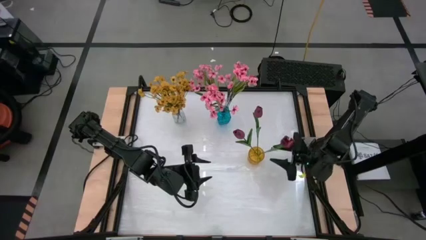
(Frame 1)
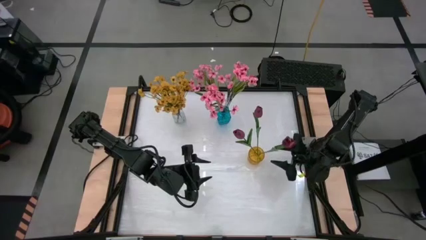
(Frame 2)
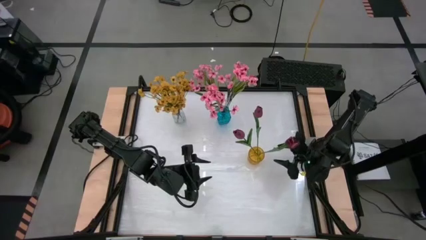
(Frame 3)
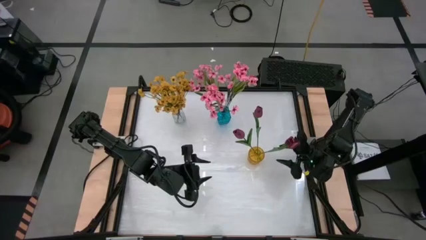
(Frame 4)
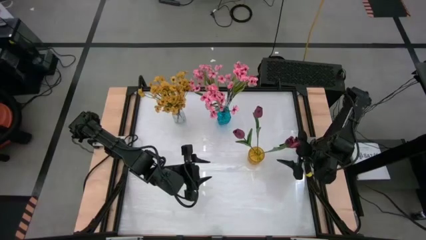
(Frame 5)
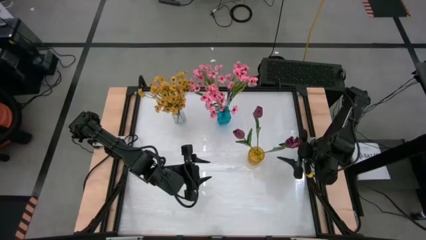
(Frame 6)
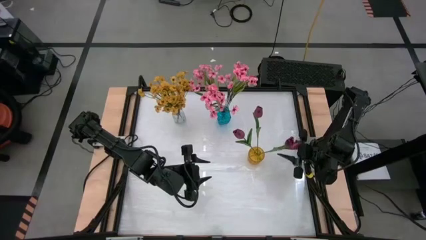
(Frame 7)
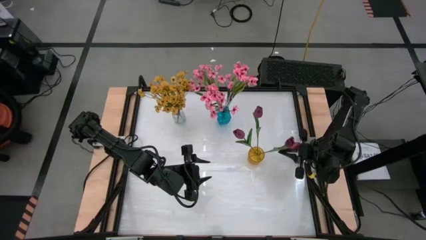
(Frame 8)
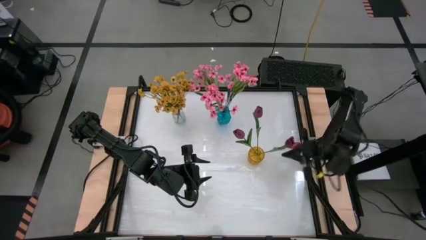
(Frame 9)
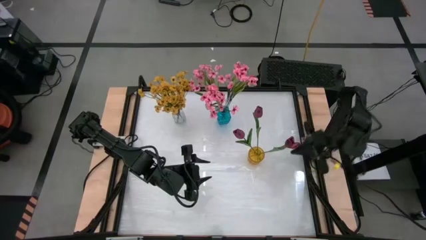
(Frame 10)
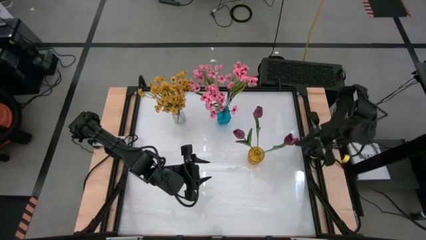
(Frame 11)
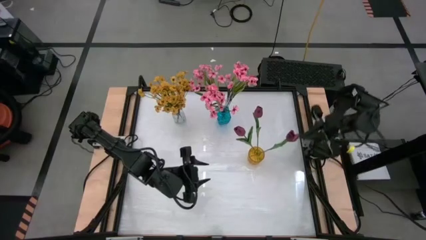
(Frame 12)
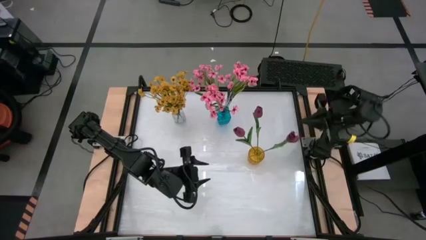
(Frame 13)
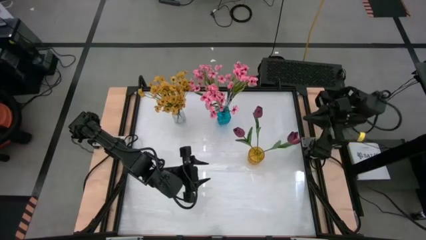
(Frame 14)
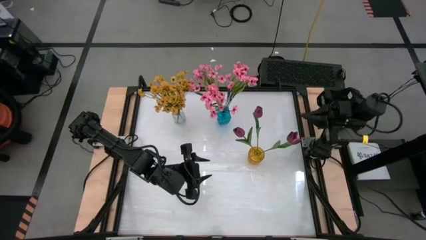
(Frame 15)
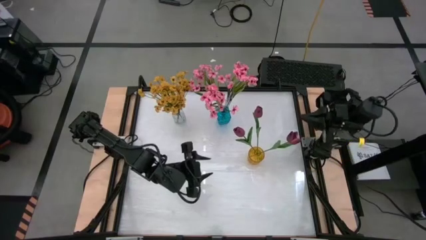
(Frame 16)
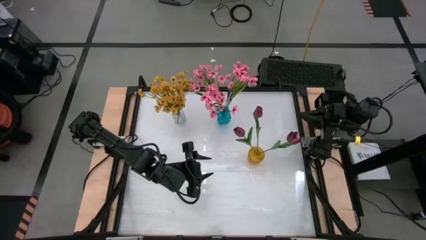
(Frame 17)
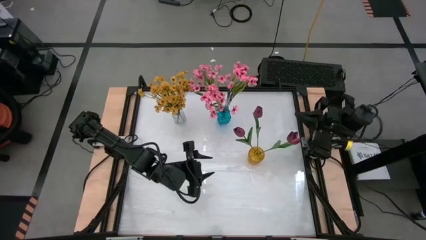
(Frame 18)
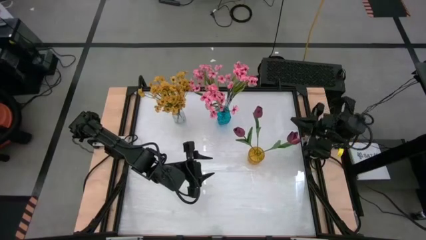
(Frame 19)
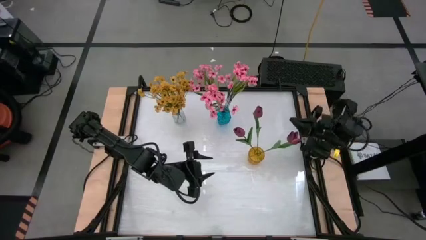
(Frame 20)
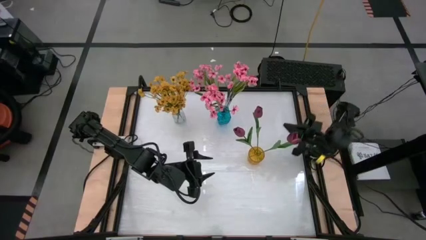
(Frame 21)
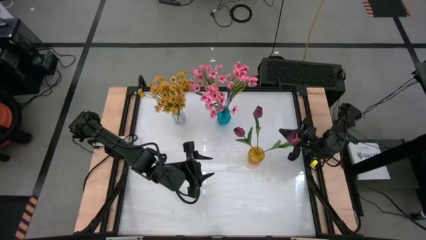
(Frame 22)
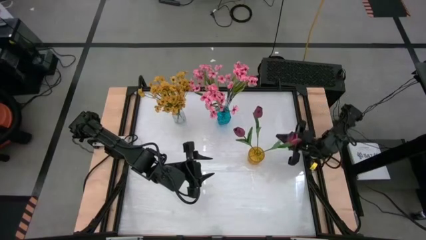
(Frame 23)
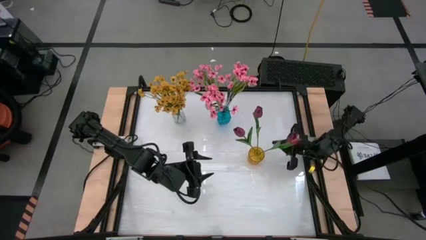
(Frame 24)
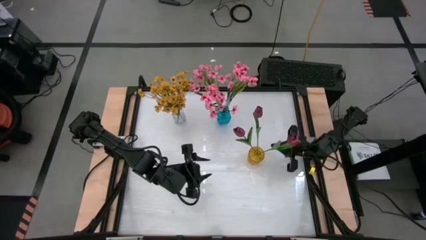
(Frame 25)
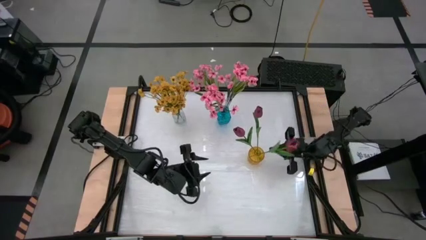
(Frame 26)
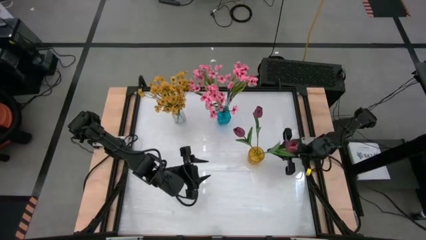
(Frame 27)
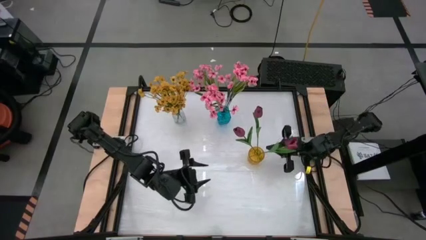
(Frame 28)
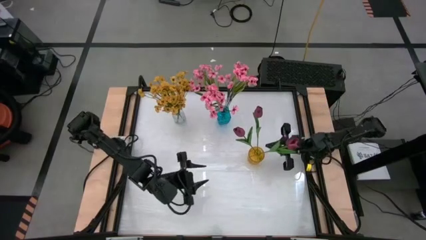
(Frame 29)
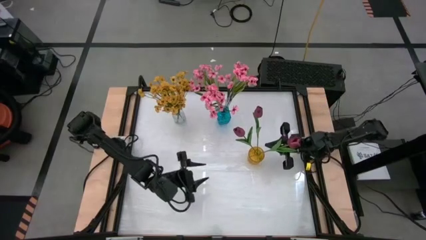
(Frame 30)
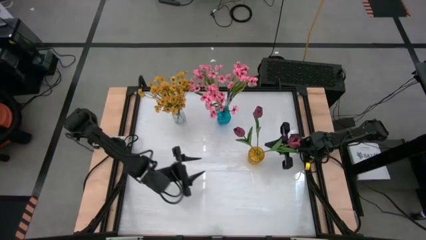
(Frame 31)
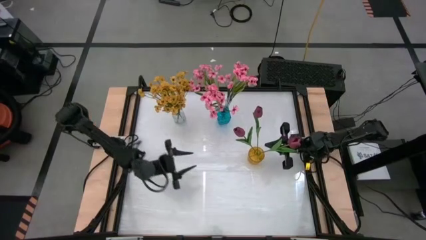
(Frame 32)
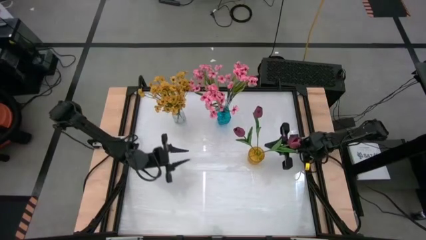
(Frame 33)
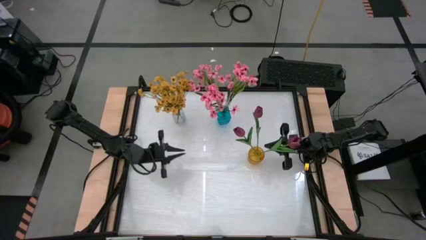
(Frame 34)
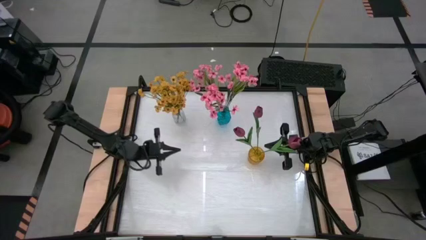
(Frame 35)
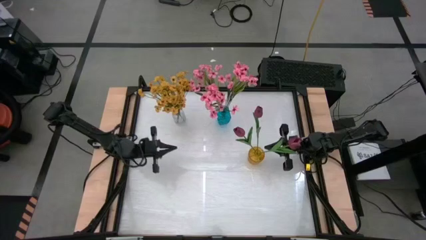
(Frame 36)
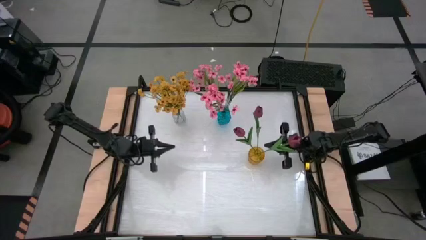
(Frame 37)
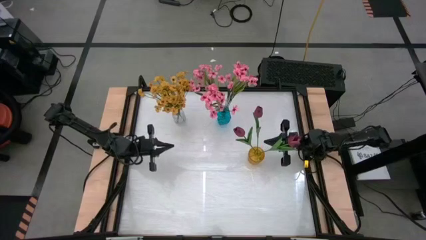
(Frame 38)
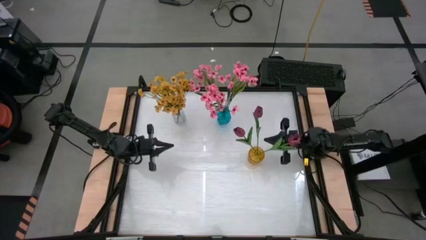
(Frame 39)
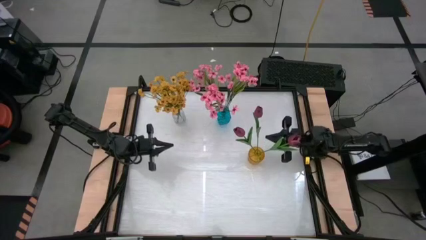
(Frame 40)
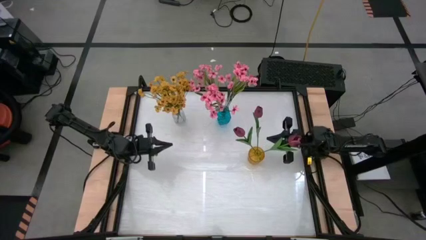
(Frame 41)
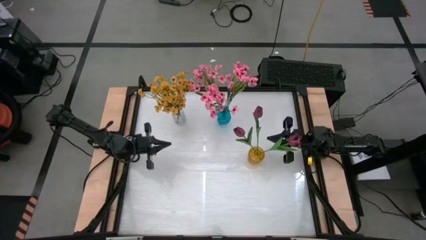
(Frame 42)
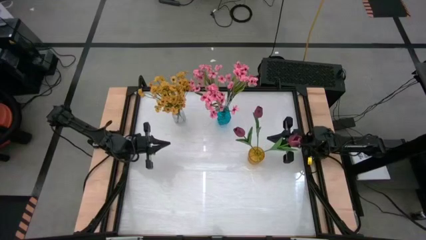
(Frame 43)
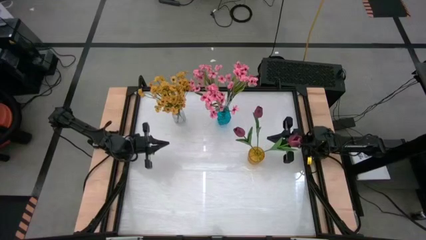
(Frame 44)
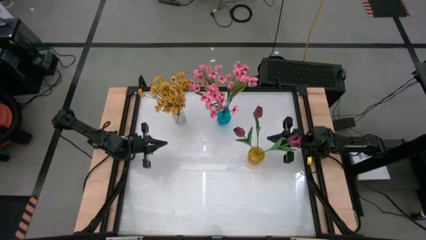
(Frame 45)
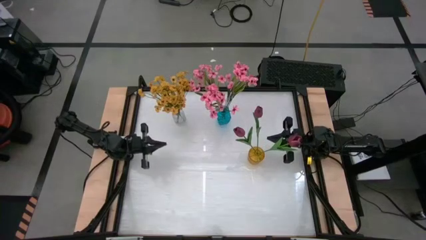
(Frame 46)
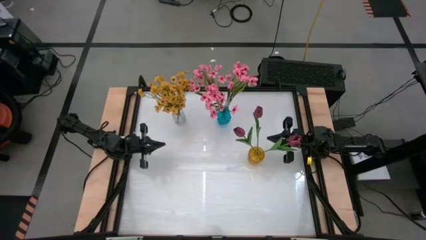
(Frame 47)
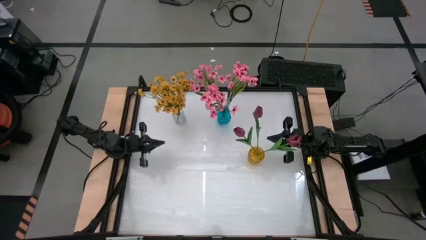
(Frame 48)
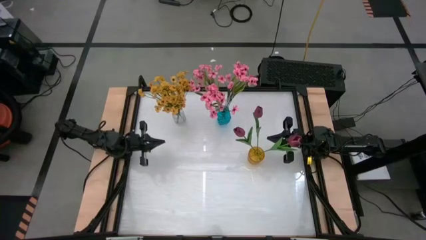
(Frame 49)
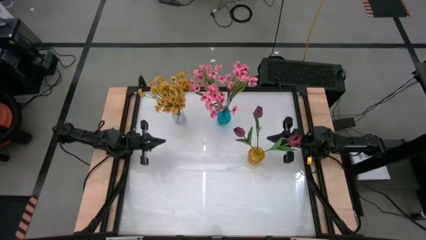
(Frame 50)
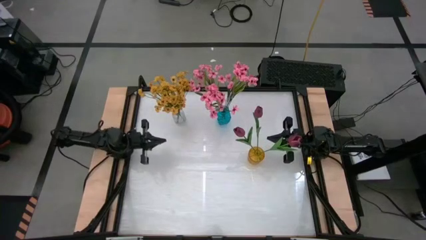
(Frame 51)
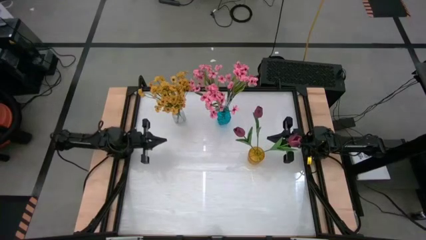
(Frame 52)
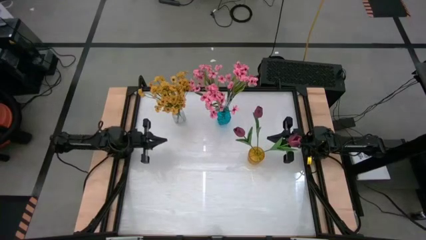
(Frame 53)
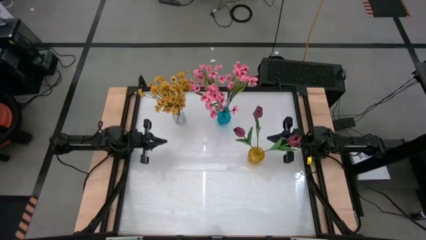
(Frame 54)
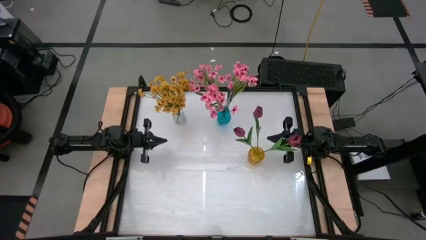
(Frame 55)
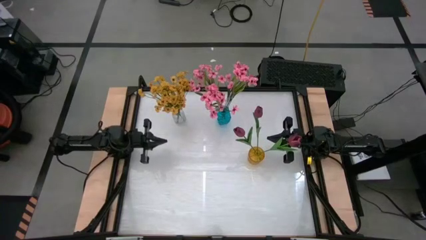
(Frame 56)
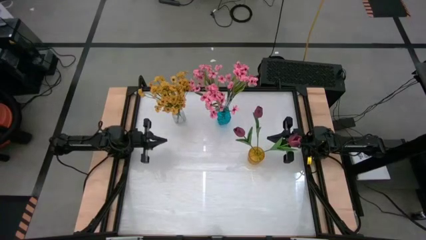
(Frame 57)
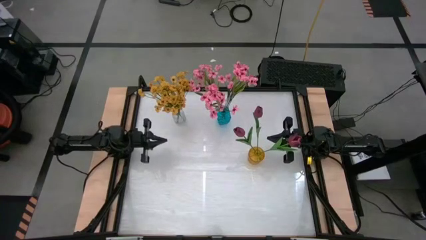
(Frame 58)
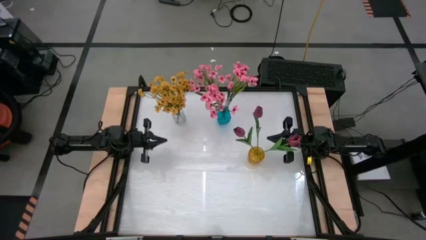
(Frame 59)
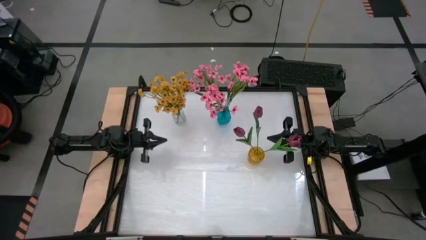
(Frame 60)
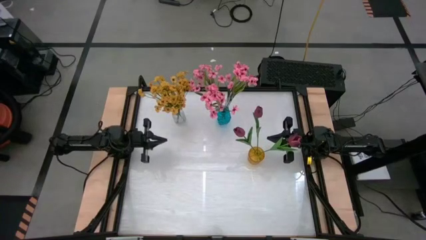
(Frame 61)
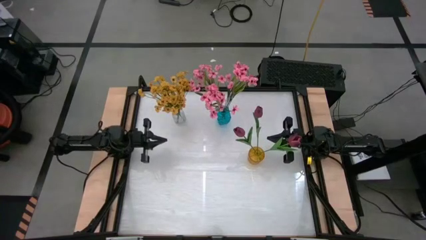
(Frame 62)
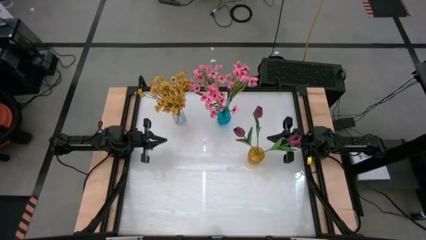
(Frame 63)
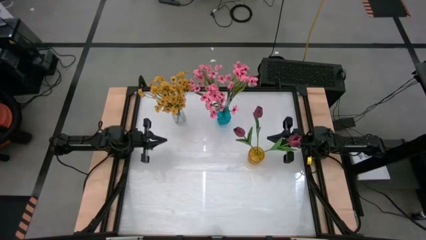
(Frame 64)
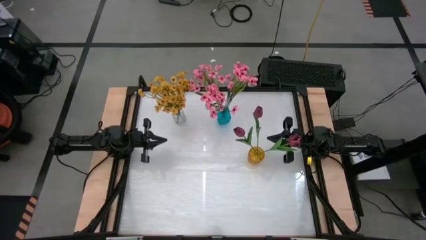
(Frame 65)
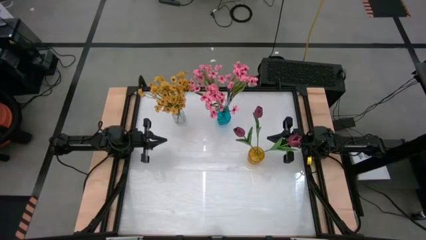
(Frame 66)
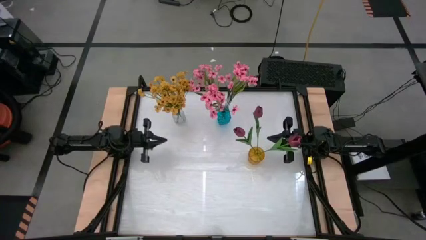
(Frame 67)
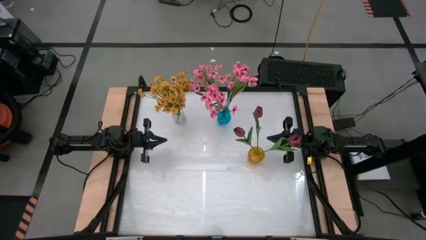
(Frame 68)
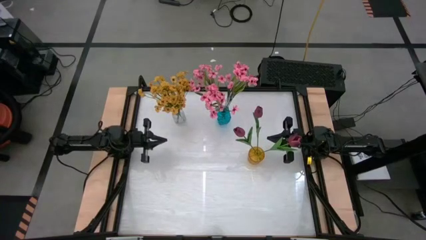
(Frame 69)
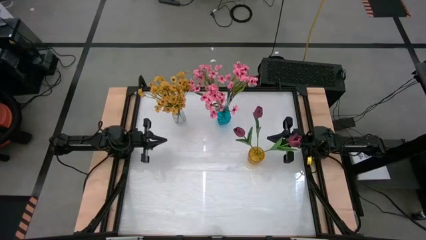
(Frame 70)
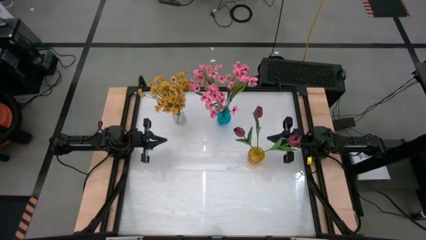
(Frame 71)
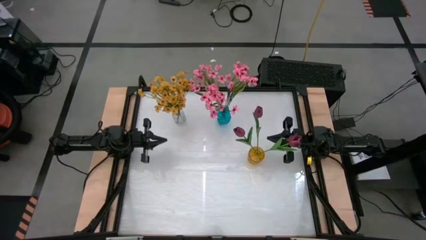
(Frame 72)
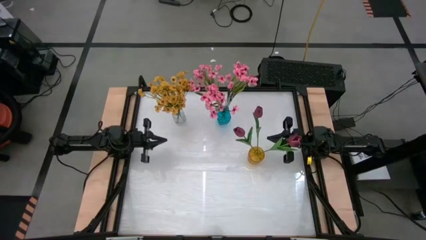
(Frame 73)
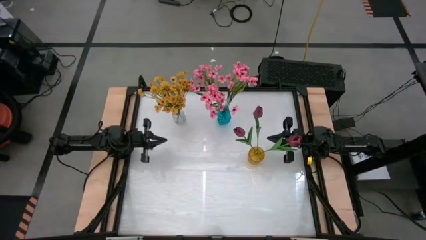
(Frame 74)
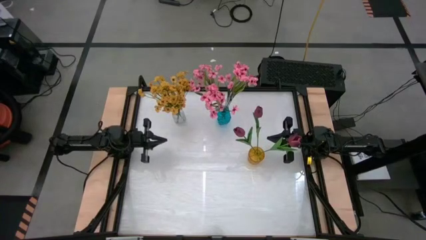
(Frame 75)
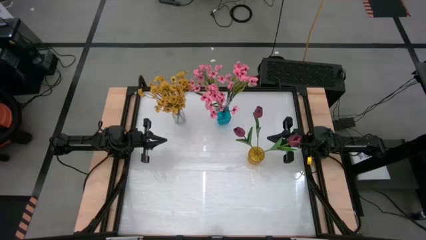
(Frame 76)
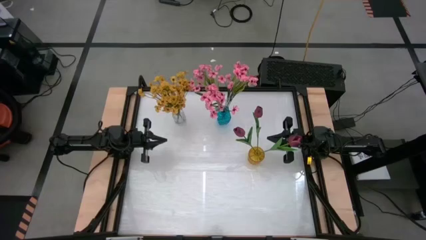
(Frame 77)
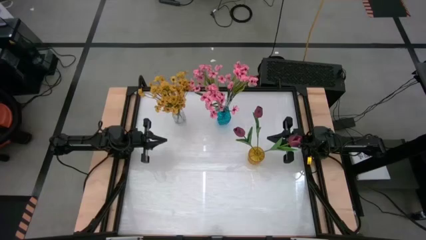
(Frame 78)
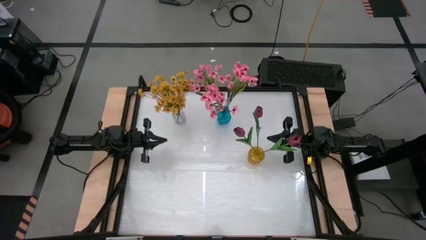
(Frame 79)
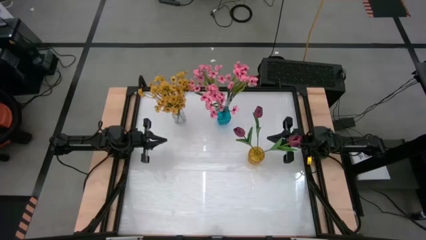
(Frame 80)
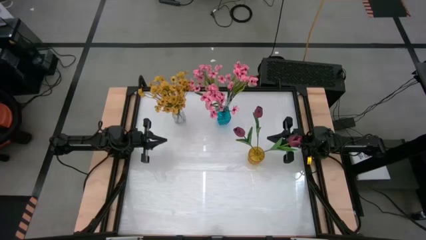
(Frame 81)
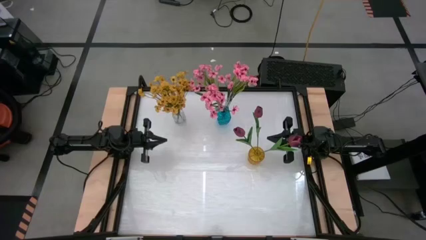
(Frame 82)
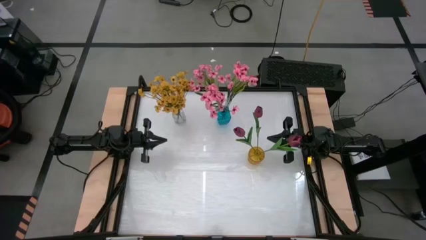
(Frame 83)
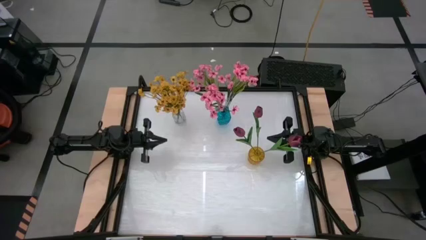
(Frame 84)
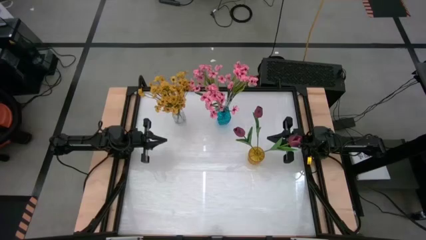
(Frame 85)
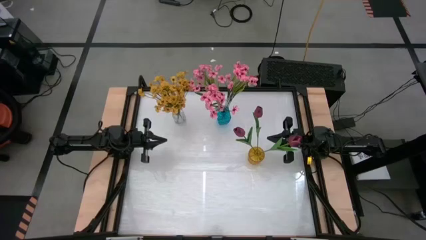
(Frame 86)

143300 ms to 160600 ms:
Task: Sort flowers into vase by color
Return to Home Position
